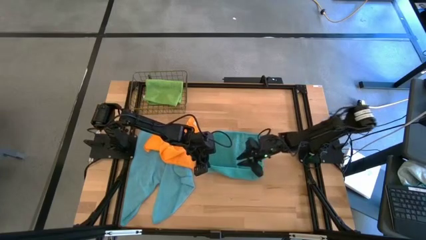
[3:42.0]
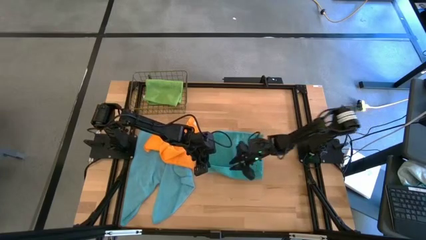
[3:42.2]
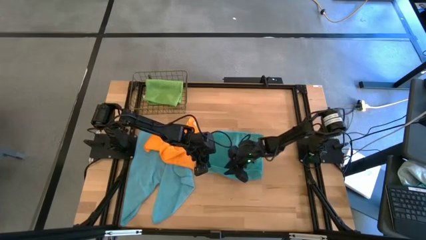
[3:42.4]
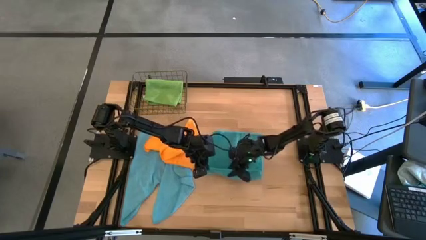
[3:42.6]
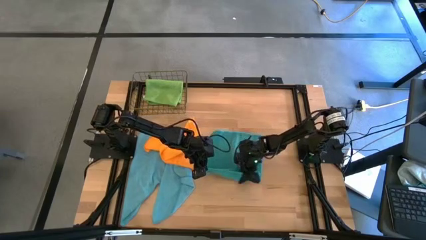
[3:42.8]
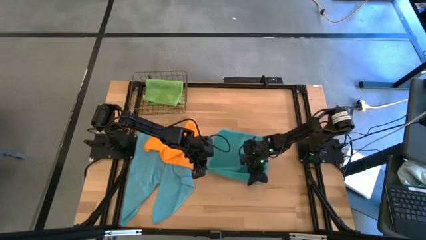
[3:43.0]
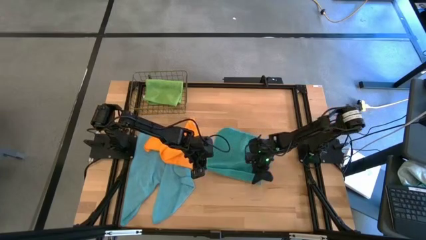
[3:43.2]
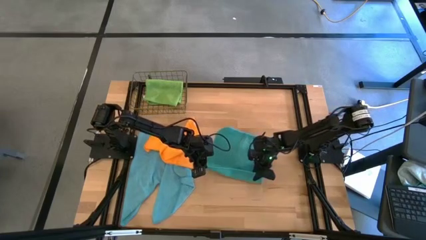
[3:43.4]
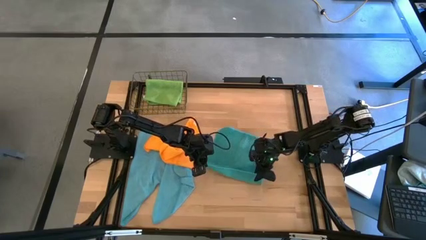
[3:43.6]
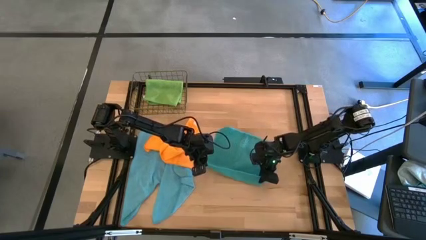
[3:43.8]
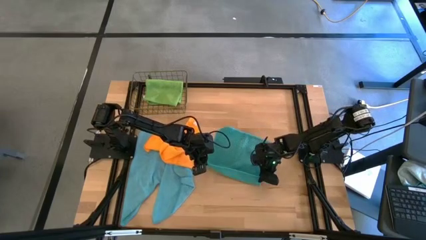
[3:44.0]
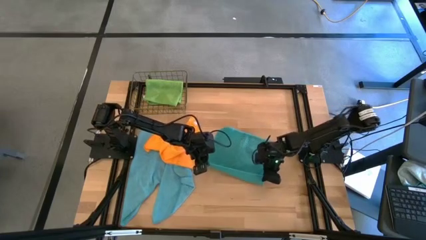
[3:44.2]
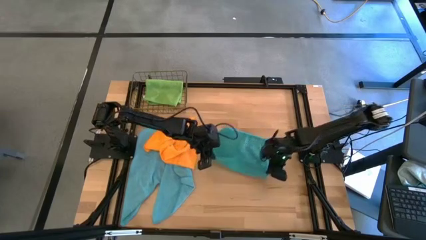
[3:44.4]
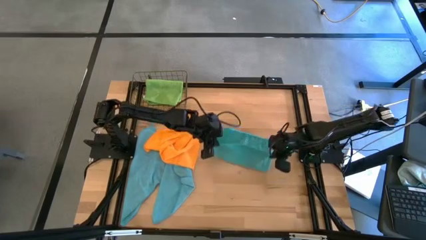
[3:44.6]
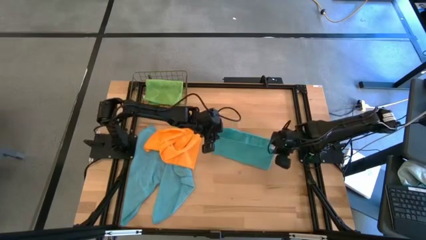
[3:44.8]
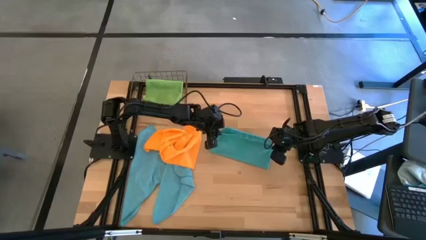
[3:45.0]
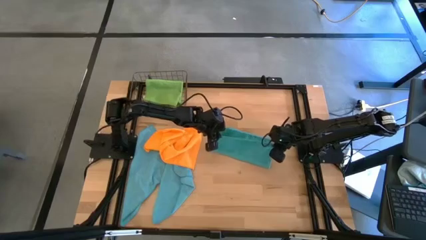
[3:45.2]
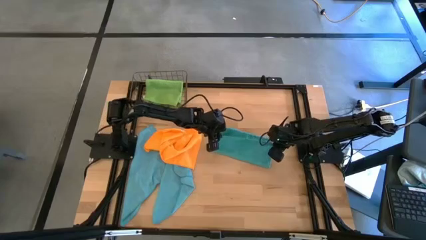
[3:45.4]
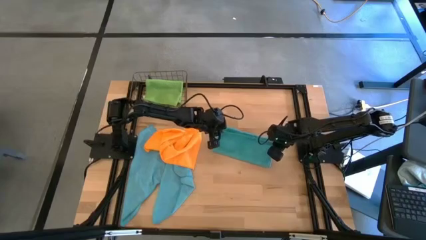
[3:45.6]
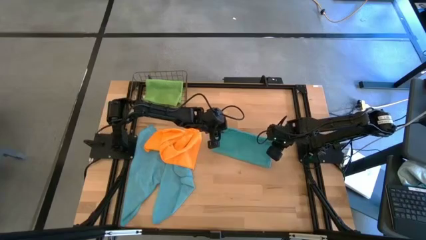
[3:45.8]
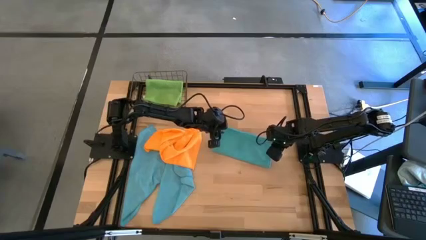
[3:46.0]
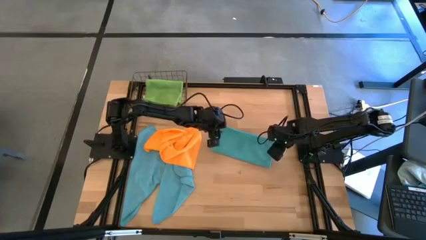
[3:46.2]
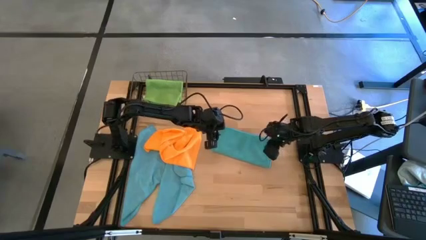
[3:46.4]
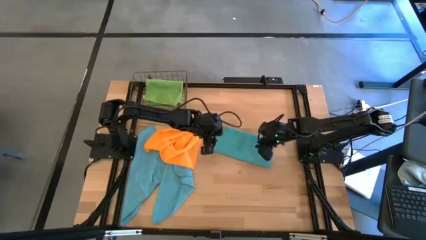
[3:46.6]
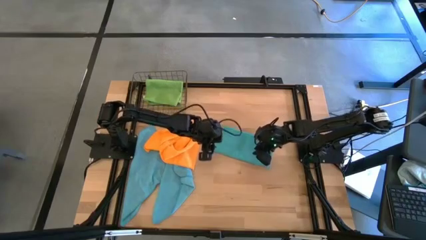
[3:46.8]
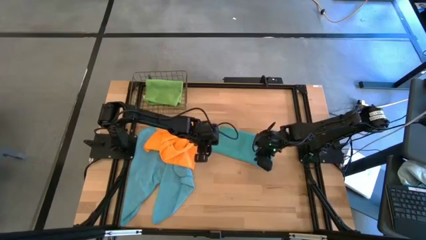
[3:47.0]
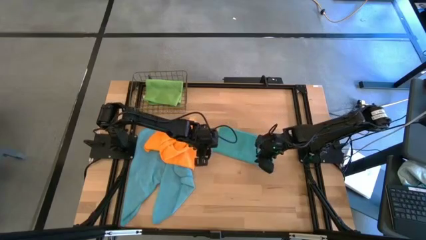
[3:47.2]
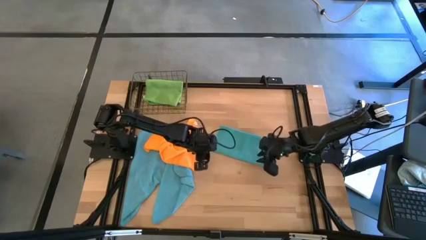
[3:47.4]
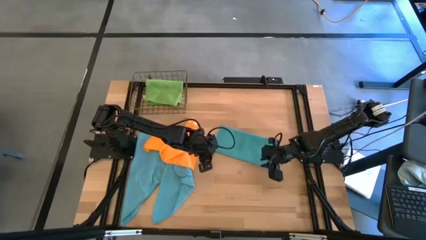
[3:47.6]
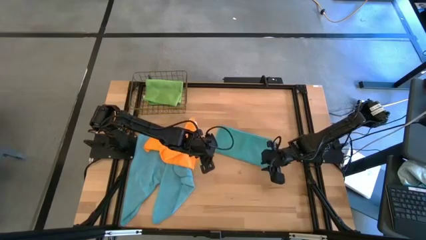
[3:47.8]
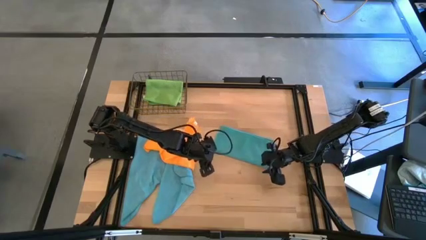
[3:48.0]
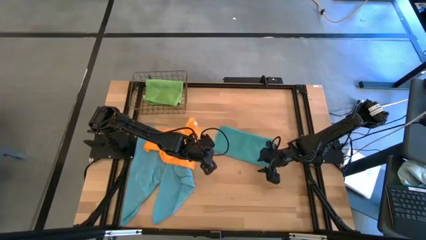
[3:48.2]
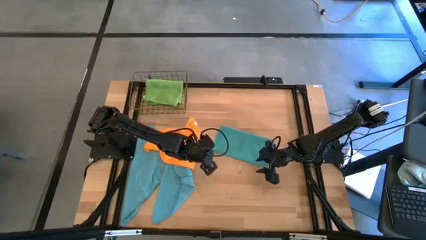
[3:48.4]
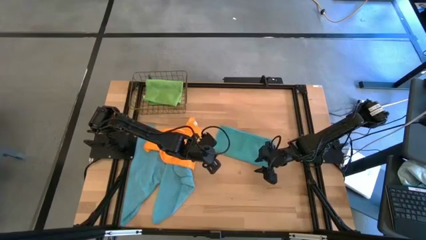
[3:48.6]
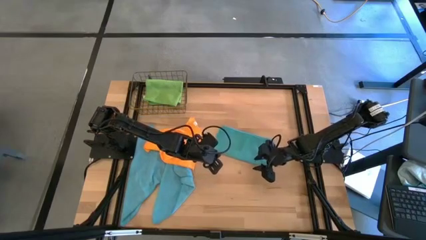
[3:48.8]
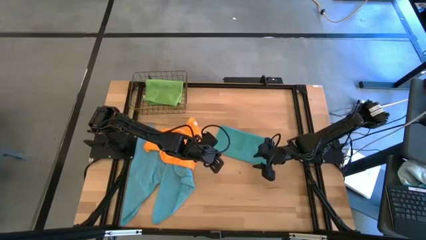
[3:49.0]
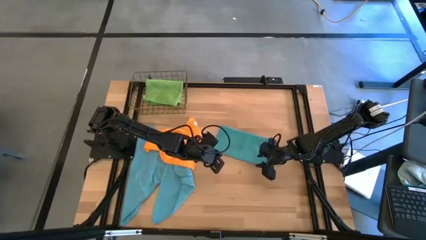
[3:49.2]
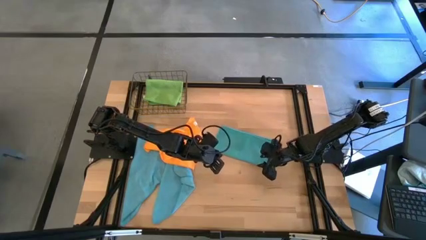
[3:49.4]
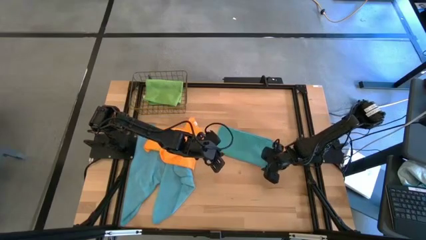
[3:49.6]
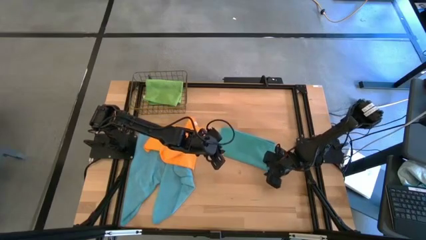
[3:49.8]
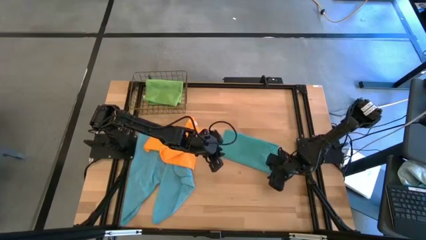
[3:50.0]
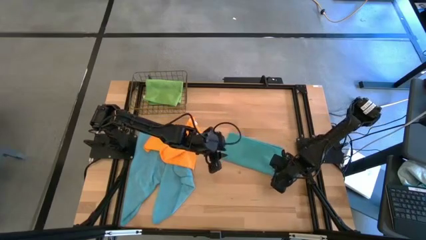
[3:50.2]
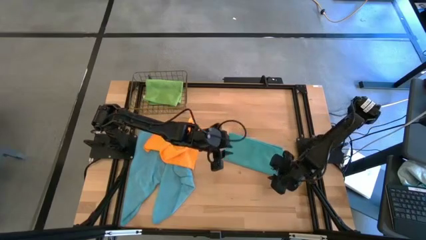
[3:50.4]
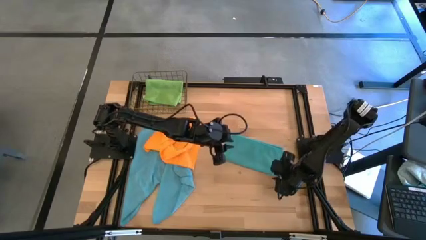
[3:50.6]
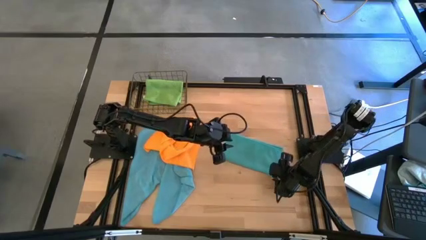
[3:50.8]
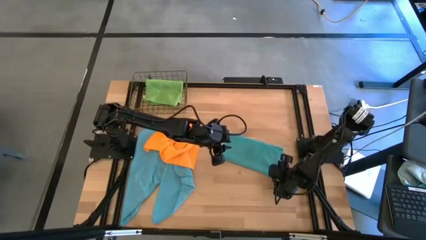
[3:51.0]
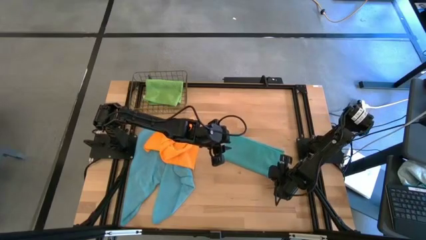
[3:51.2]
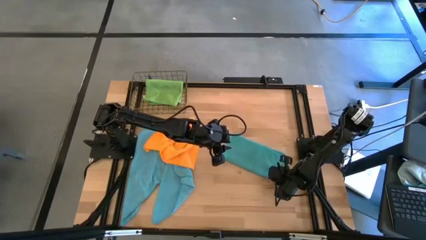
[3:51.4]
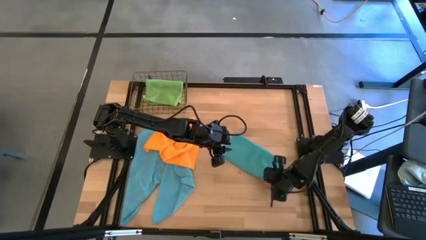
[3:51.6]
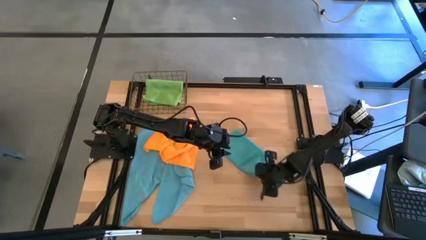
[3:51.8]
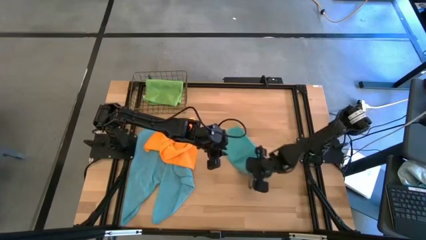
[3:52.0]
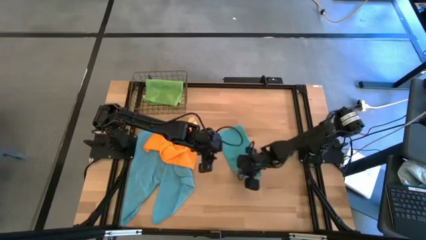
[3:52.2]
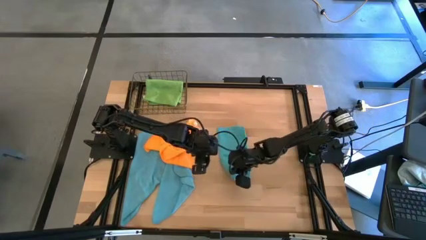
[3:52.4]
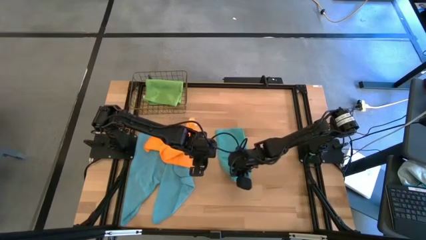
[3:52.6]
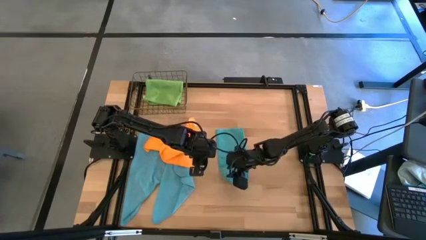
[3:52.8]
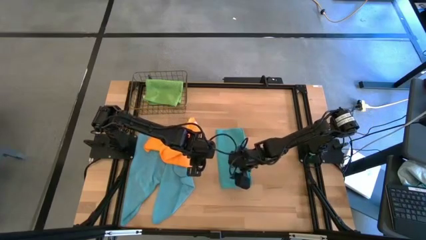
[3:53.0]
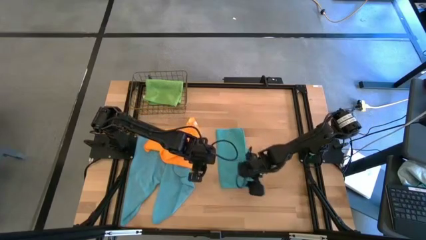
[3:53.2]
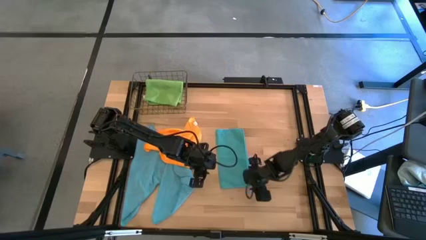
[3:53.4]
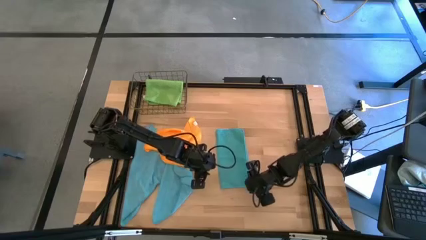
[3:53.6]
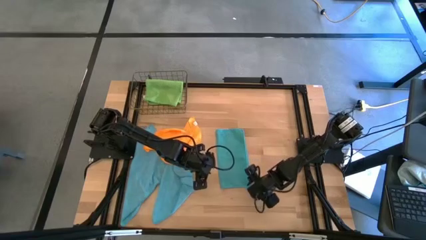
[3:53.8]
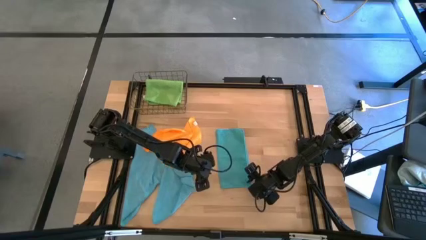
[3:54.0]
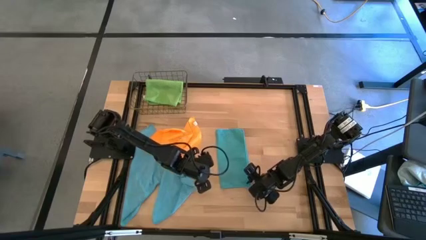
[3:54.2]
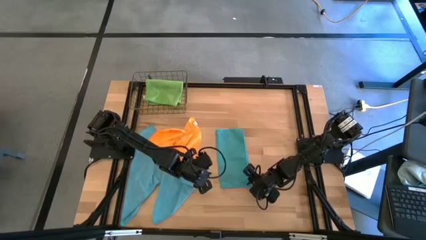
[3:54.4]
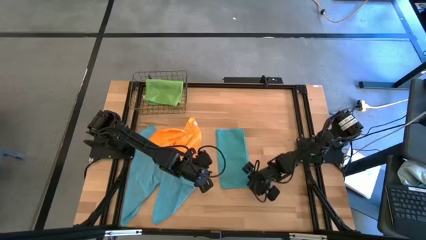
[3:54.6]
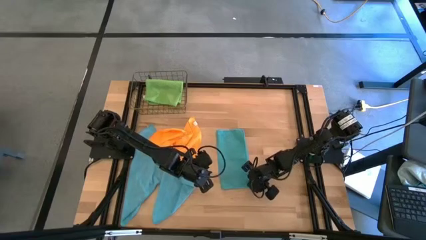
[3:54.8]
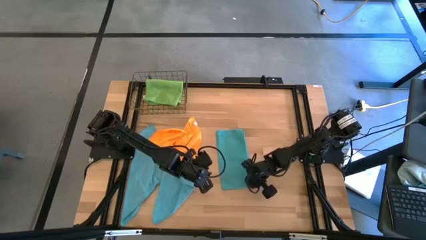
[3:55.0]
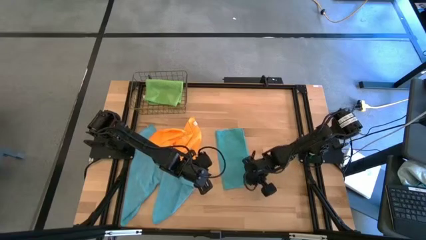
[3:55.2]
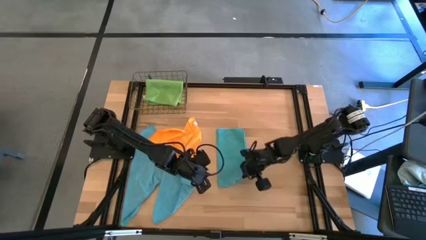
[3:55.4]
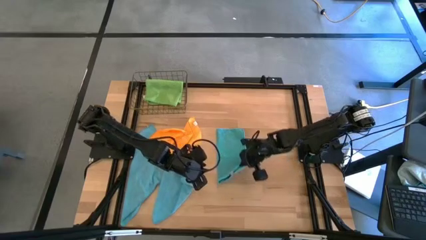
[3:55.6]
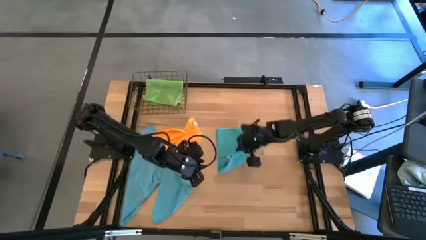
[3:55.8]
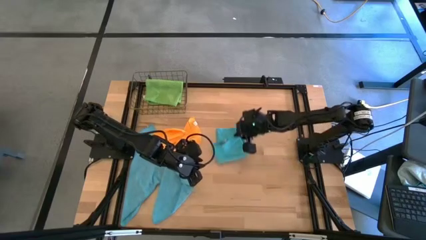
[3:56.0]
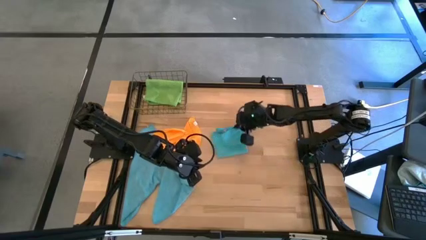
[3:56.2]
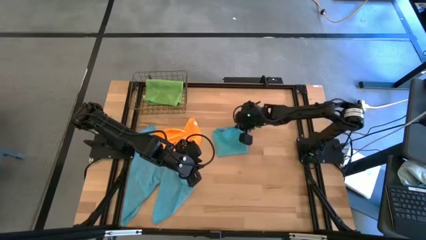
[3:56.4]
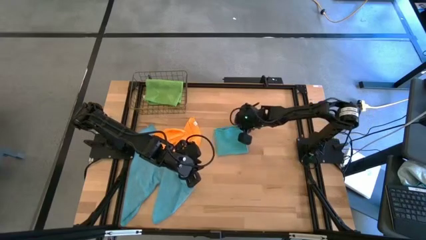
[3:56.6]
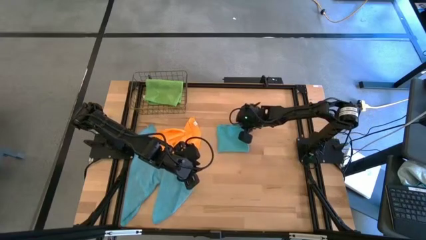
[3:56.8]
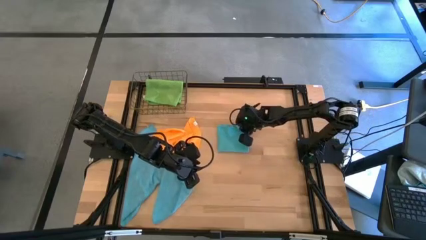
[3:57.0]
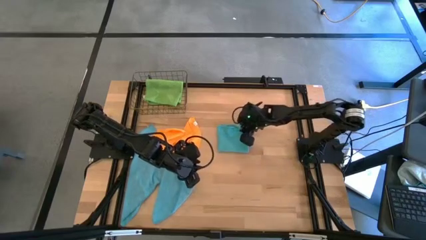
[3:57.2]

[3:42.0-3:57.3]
Task: Fold microfiber towels
Fold the blue microfiber cloth
